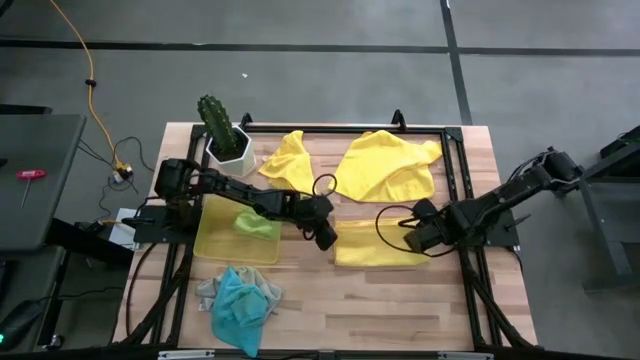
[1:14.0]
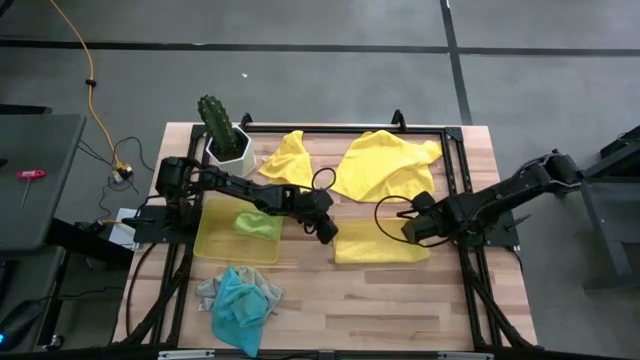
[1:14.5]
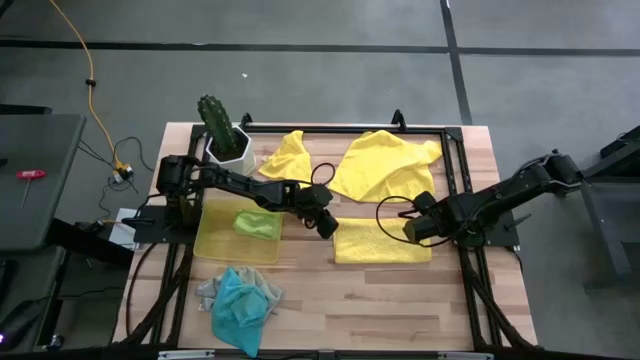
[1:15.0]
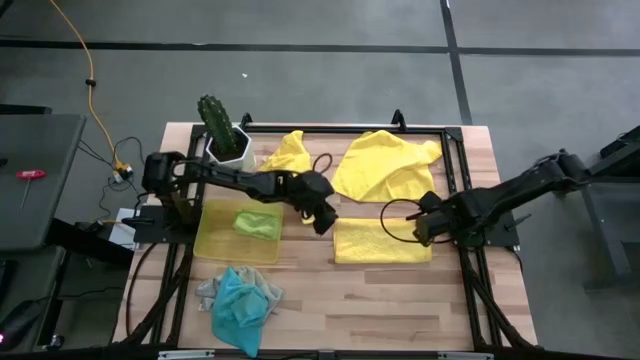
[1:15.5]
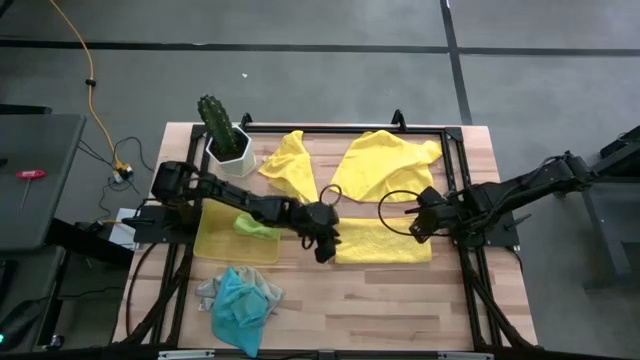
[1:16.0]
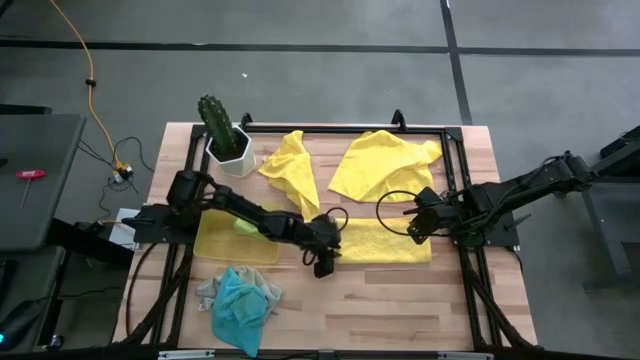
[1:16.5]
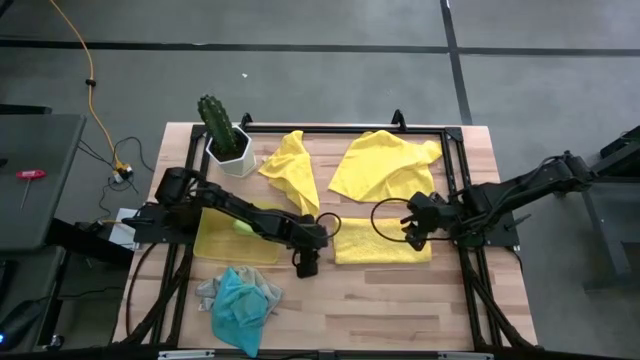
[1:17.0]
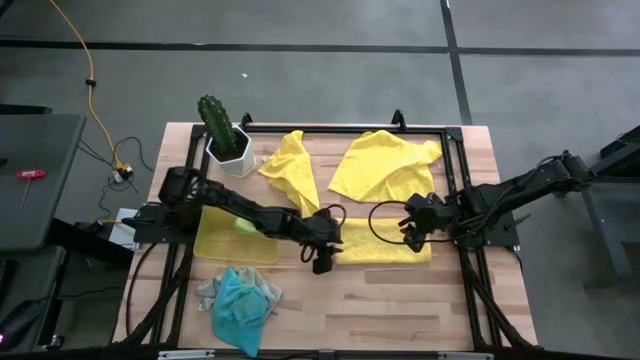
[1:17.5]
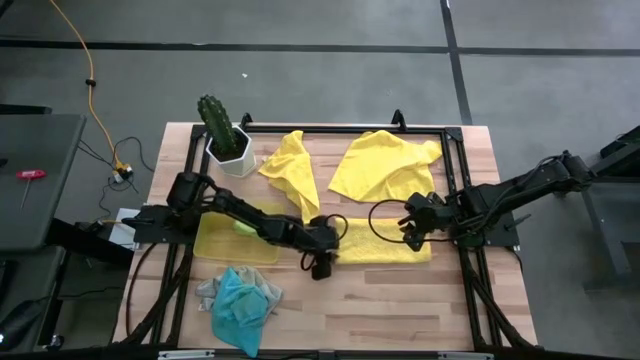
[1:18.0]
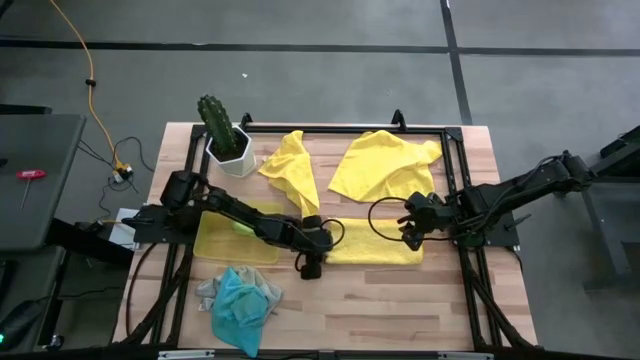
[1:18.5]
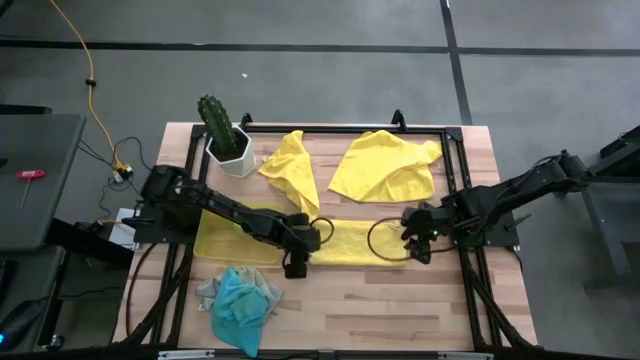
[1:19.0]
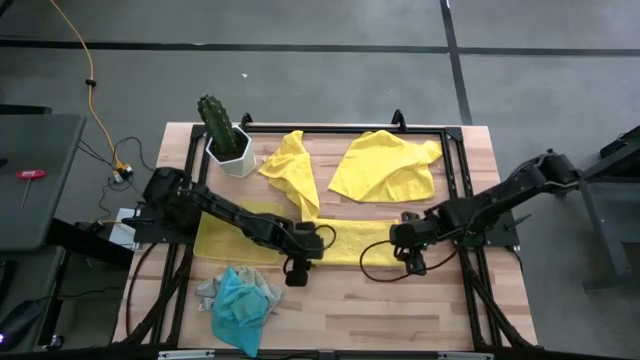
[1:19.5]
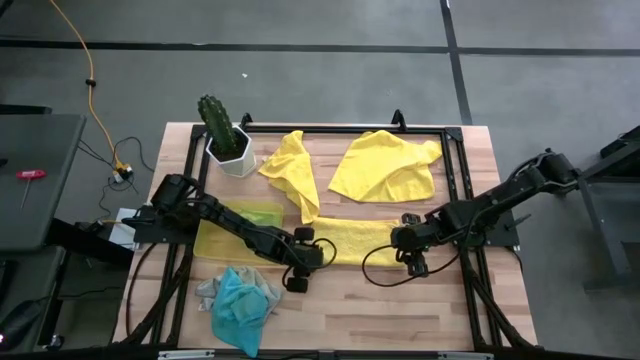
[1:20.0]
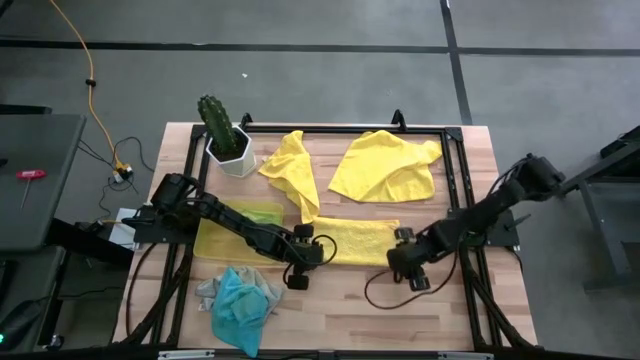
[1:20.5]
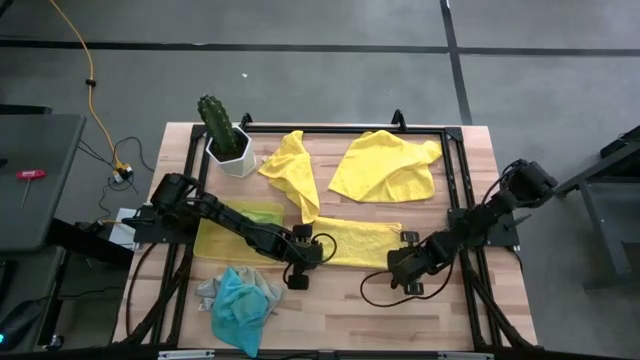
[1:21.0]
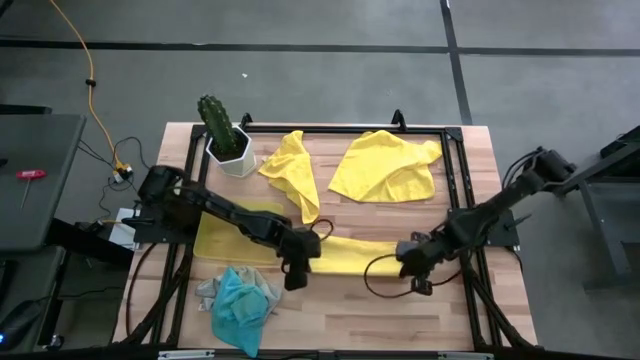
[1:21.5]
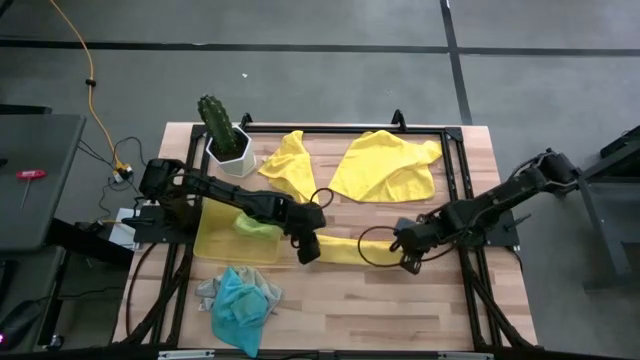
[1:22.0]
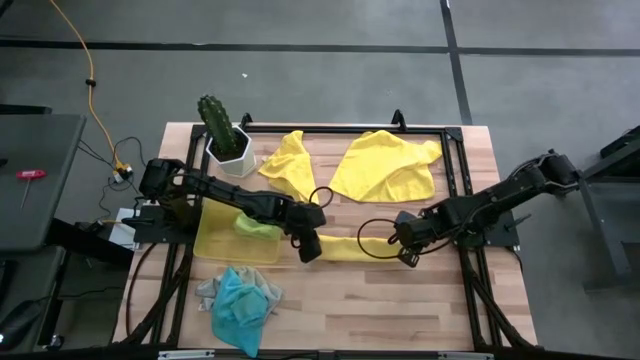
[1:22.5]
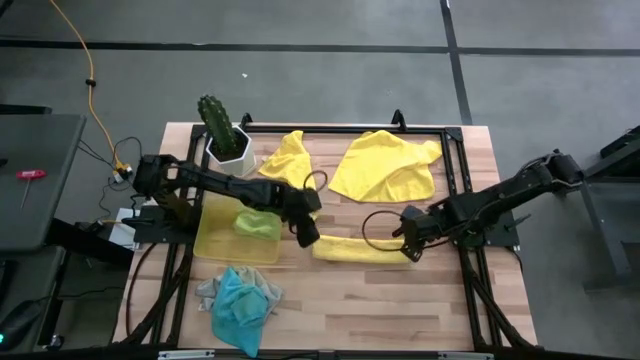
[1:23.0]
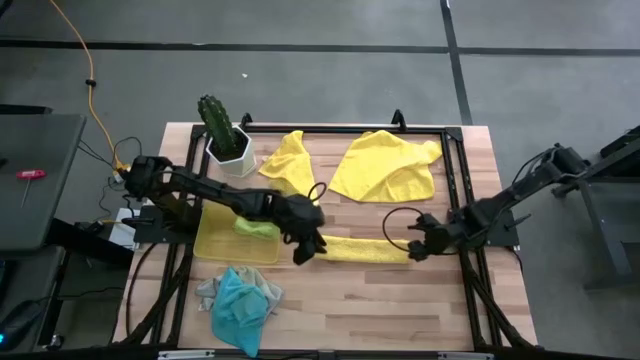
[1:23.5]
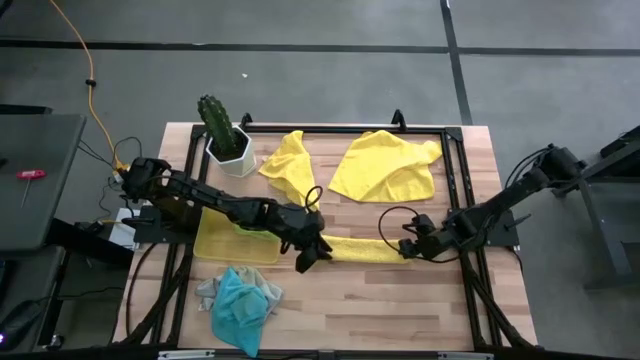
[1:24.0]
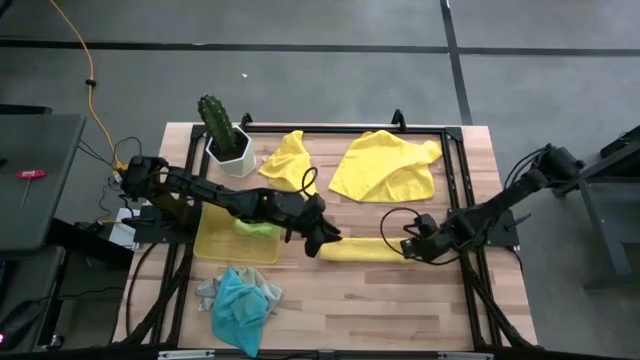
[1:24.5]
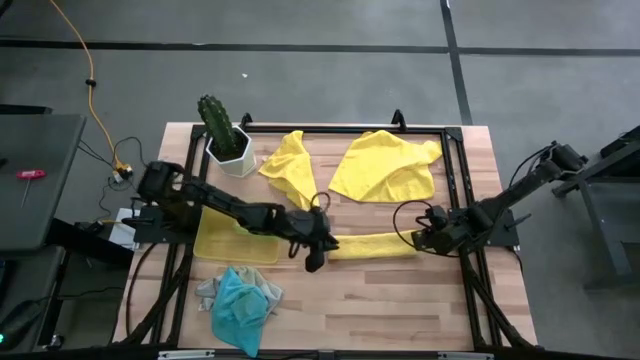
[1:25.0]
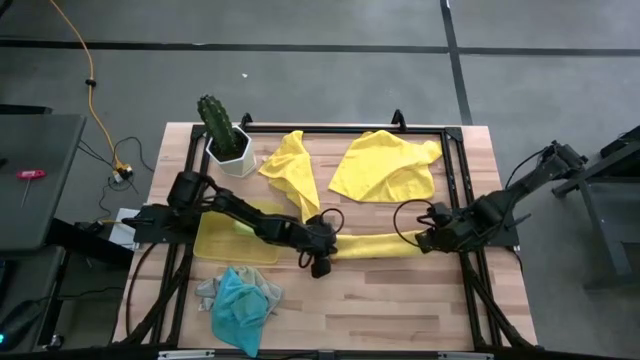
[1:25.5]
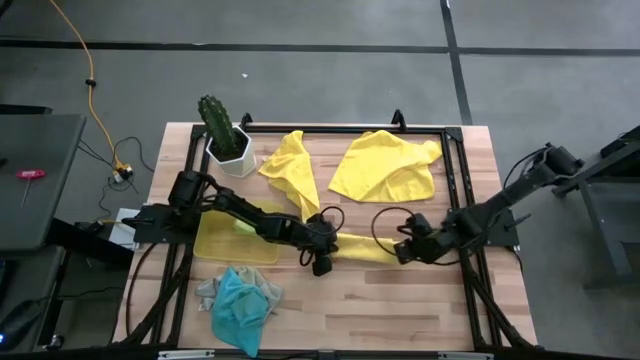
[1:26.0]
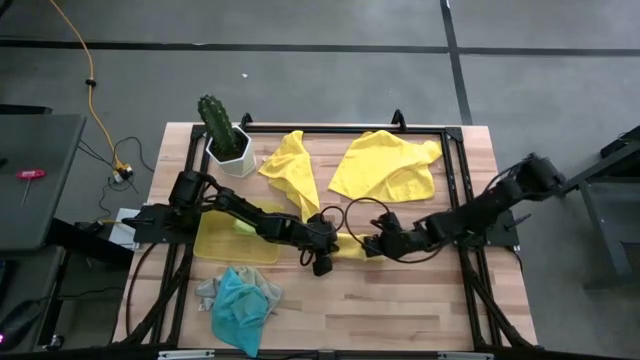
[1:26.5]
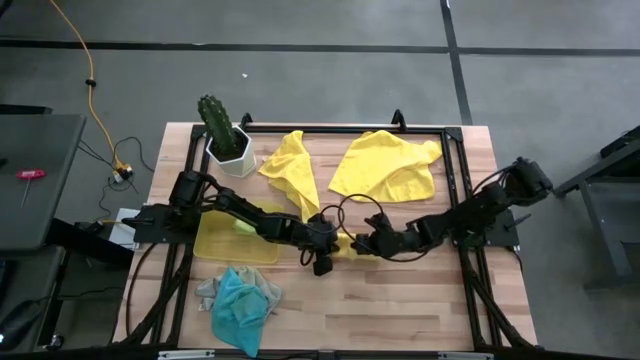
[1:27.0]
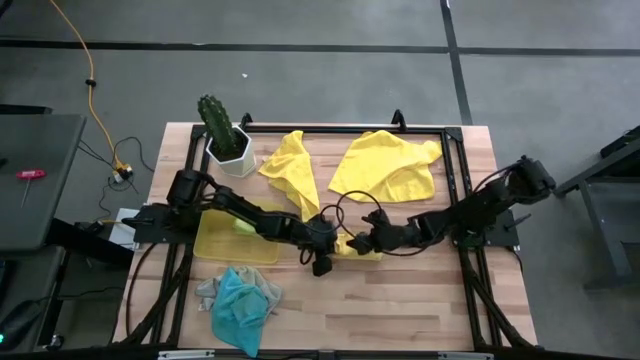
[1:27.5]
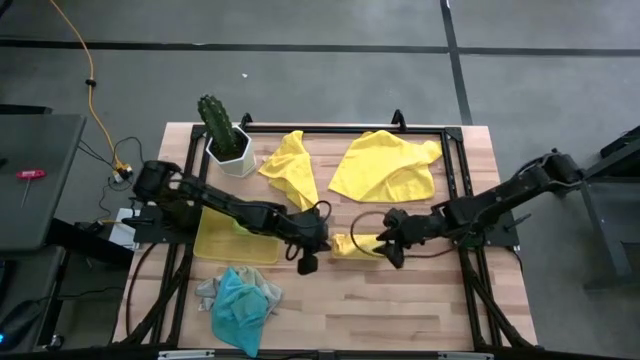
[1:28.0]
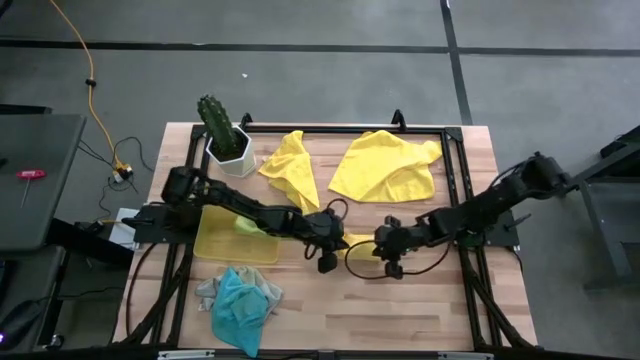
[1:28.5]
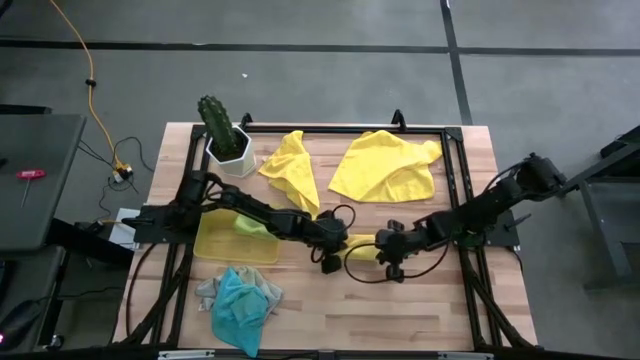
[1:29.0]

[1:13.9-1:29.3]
Task: Fold microfiber towels
Fold the bottom yellow microfiber towel

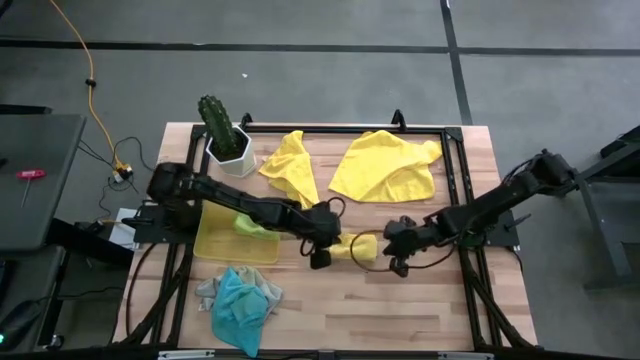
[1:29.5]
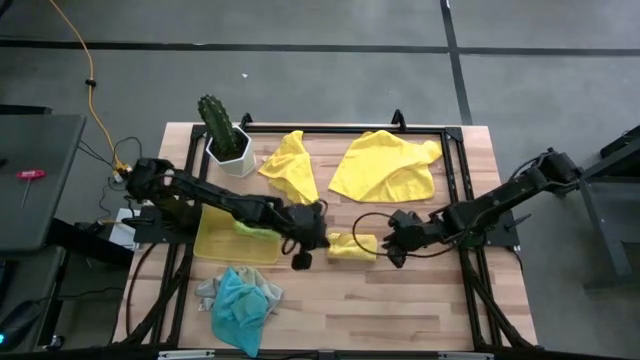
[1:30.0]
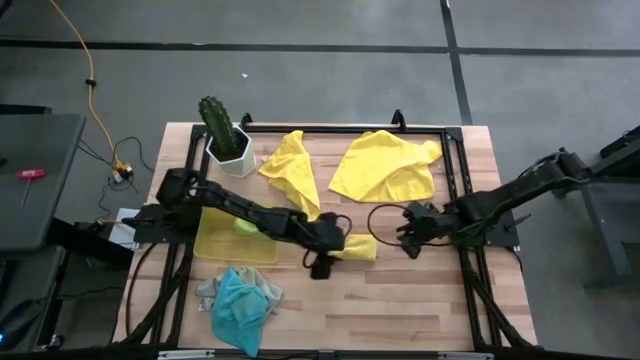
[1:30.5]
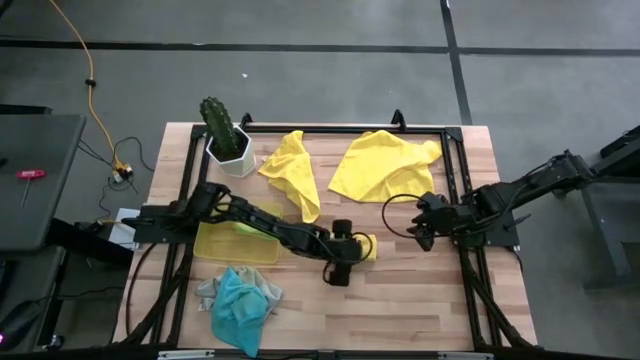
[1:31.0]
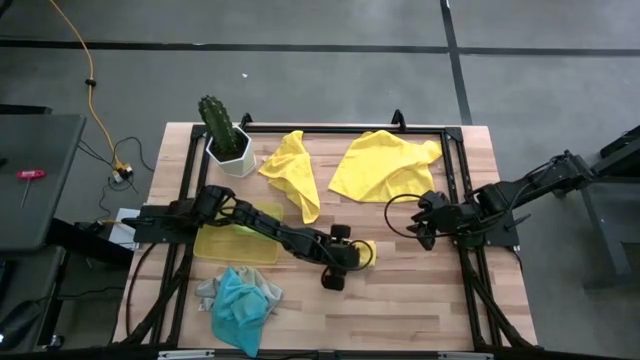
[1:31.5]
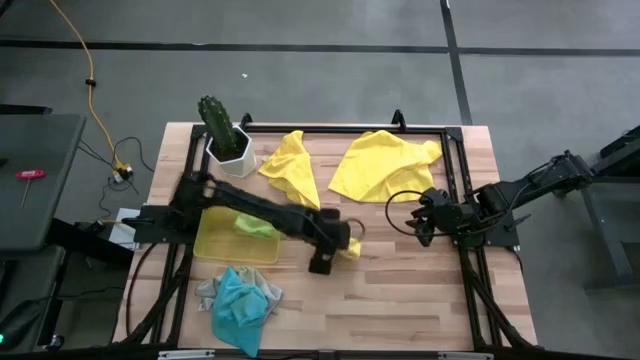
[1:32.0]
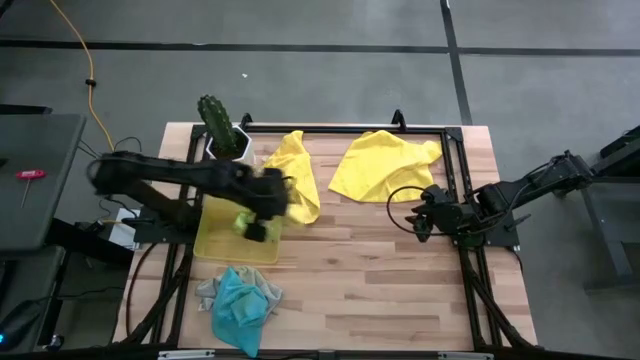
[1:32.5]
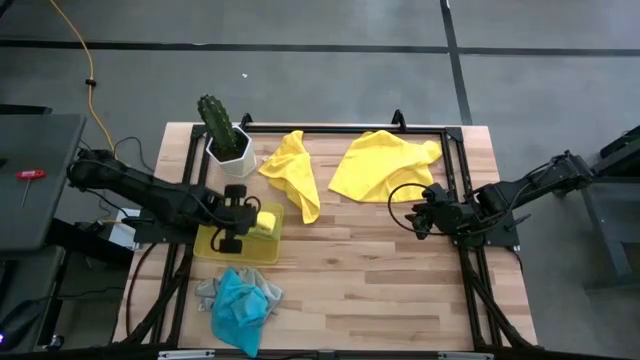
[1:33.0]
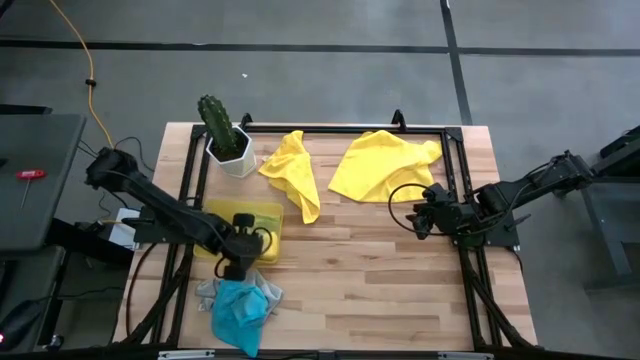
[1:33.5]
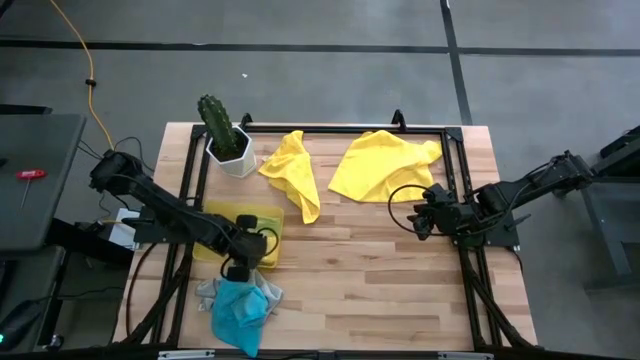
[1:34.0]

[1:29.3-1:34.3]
Put the bottom yellow microfiber towel into the yellow bin
